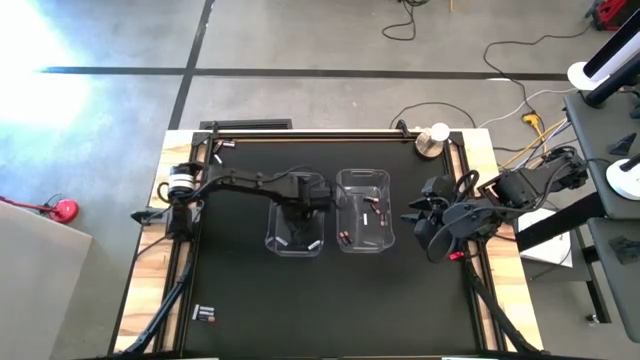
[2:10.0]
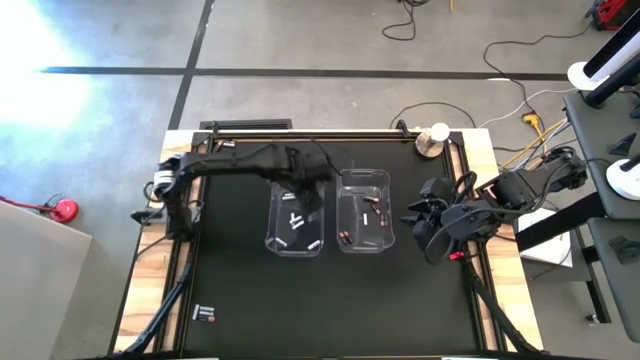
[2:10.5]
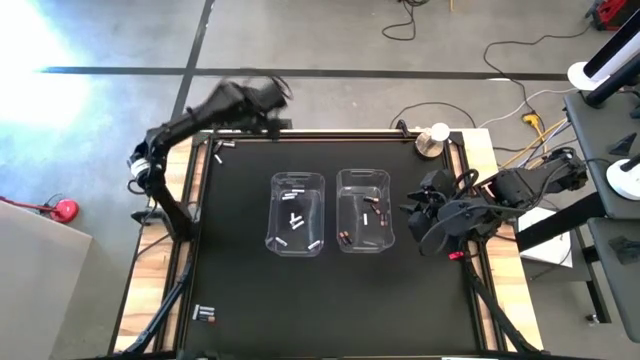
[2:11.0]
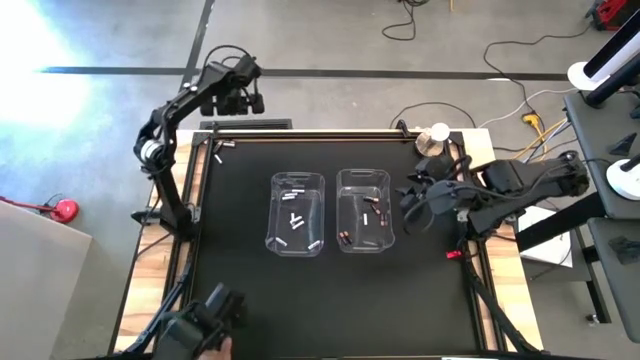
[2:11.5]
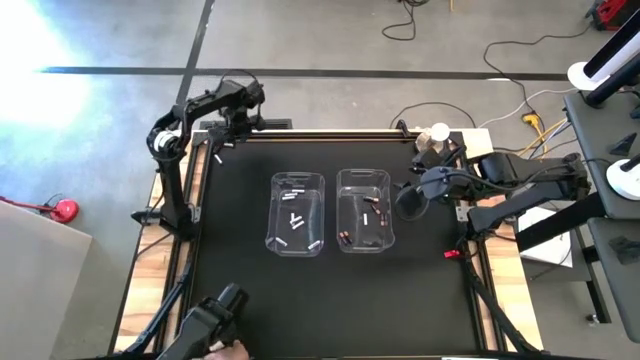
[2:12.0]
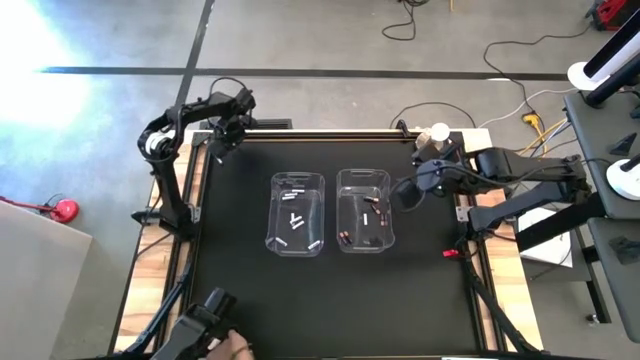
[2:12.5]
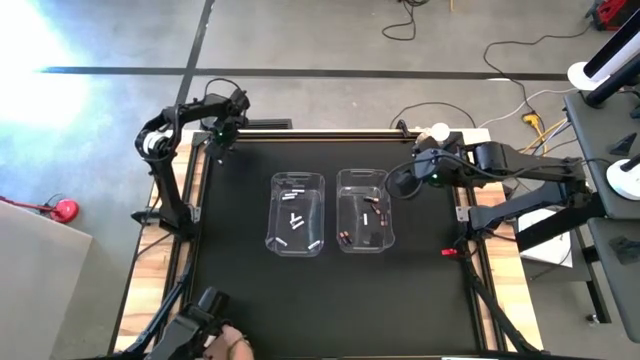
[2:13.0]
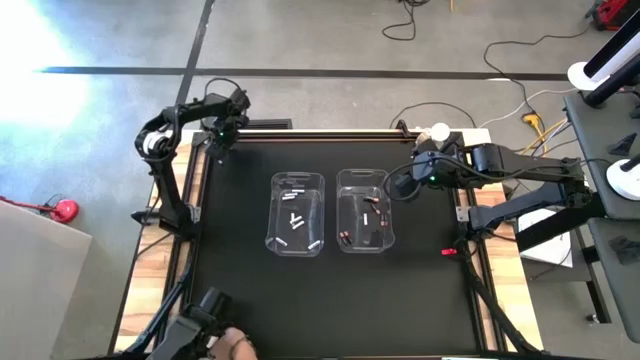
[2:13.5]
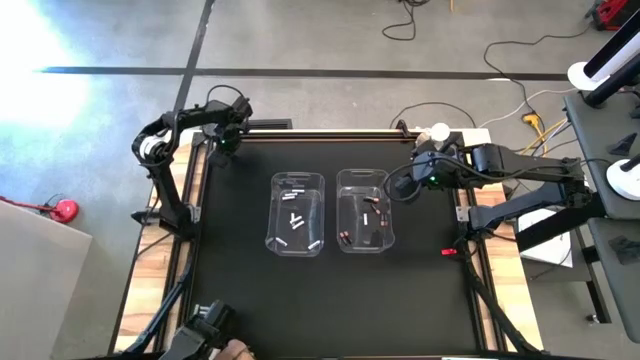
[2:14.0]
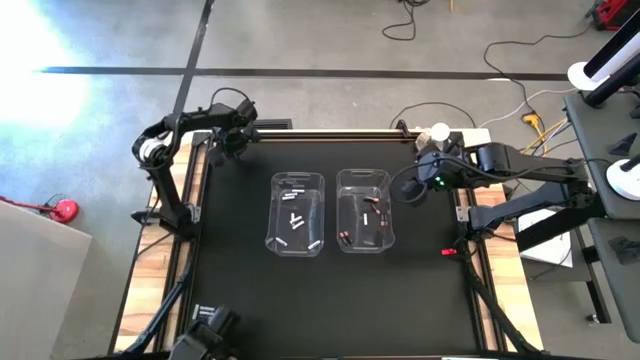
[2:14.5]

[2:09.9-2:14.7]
Task: Sort batteries
Put the white battery into the left transparent bin

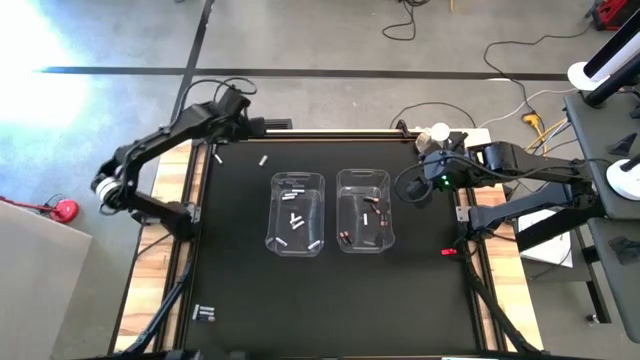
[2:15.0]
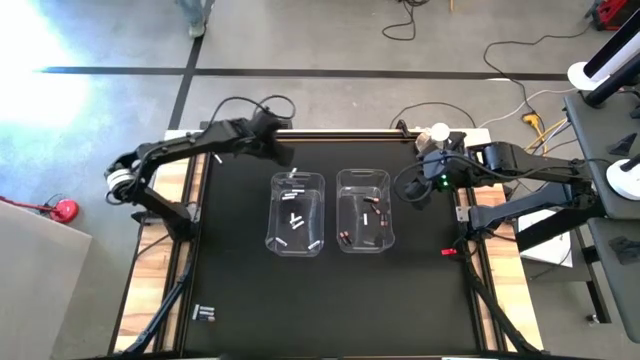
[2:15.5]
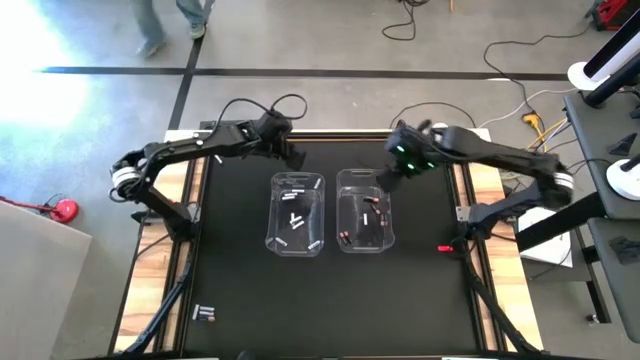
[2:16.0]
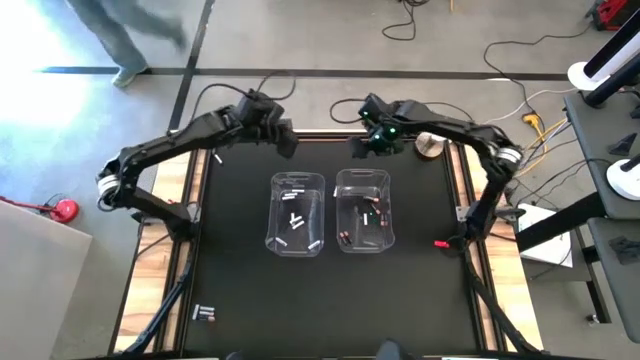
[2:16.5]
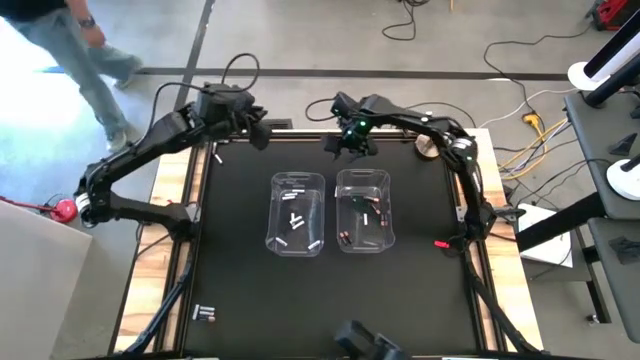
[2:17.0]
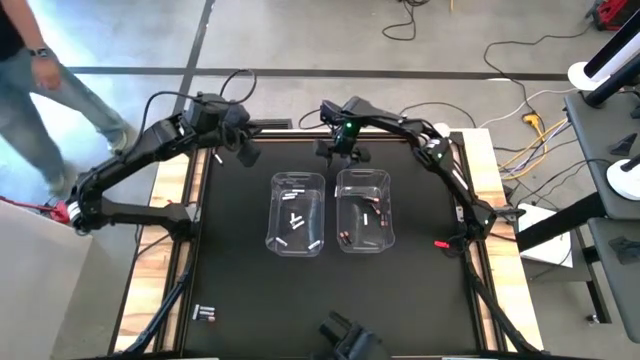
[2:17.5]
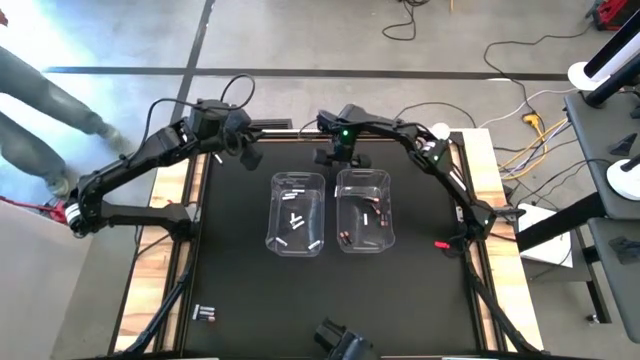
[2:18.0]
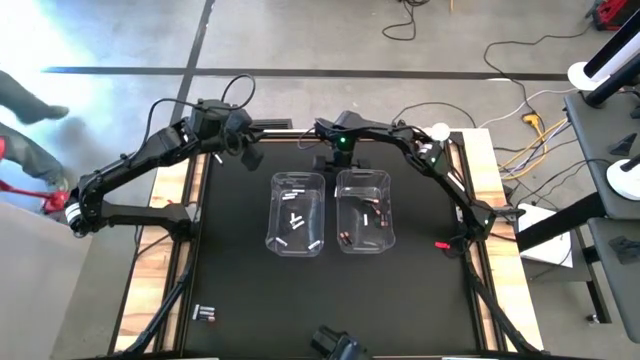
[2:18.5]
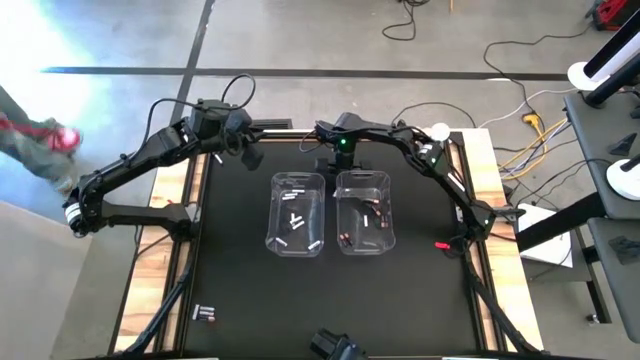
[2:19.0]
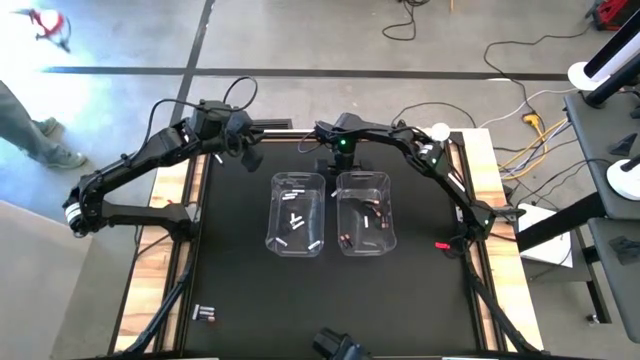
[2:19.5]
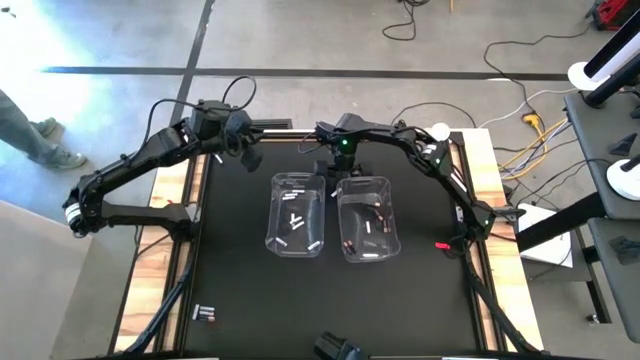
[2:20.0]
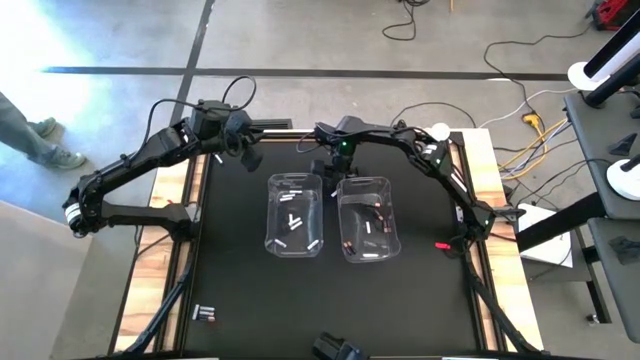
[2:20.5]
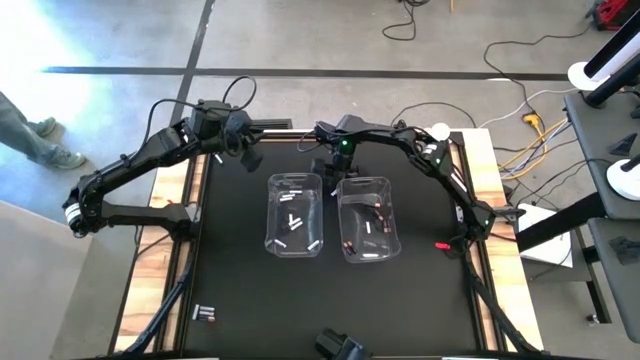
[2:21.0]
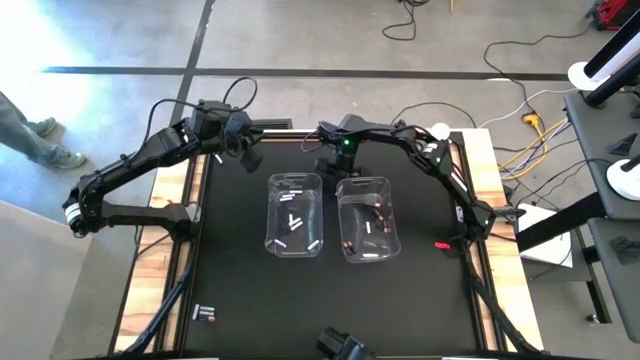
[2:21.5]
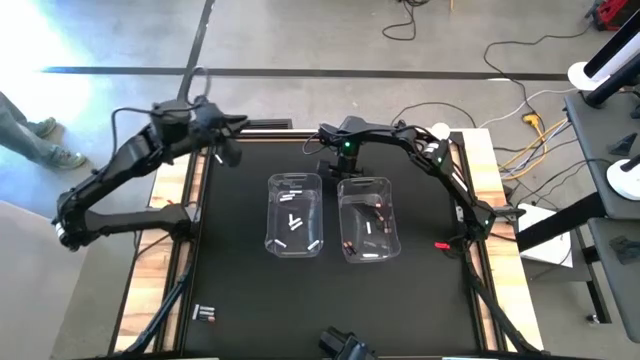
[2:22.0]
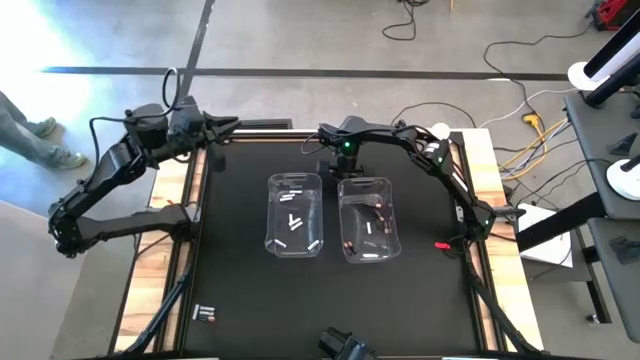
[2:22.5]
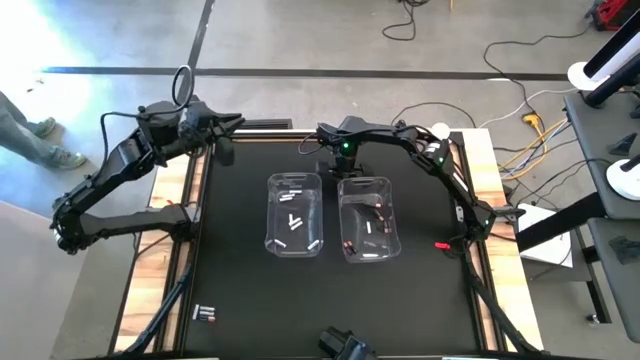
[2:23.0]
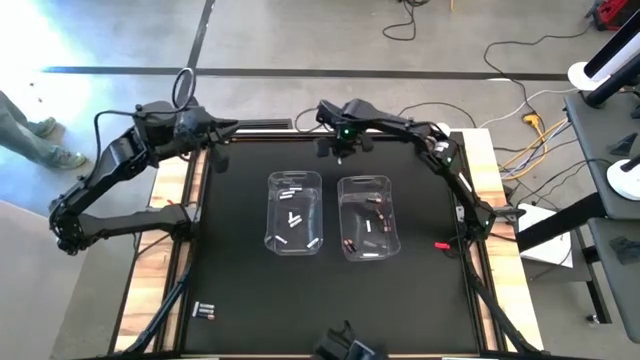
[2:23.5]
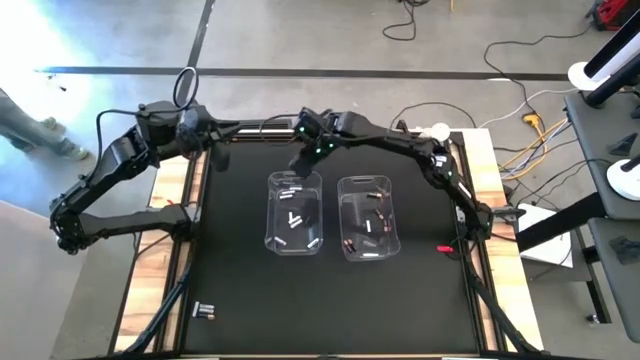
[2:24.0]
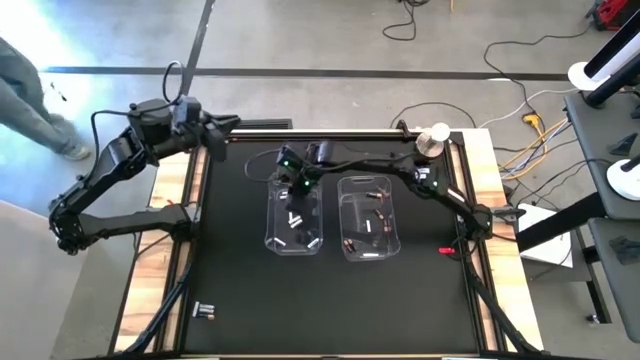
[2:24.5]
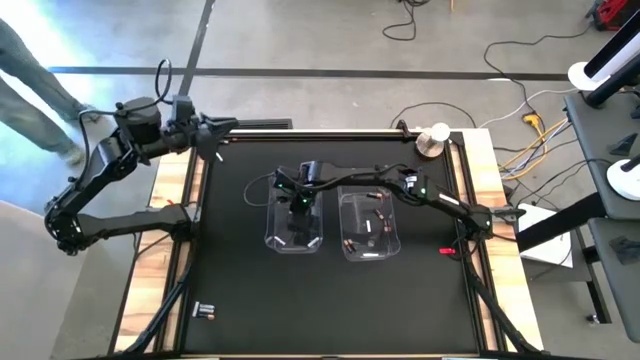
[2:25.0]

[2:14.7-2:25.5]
Put the white battery into the left transparent bin

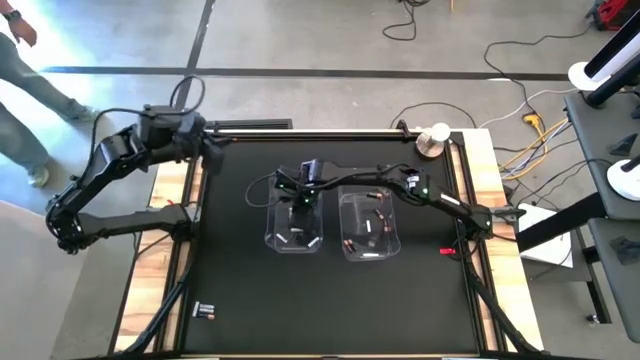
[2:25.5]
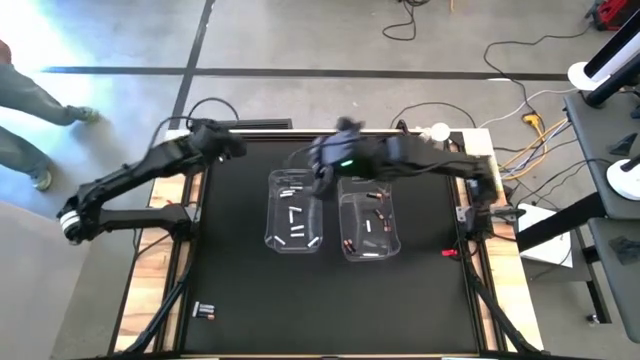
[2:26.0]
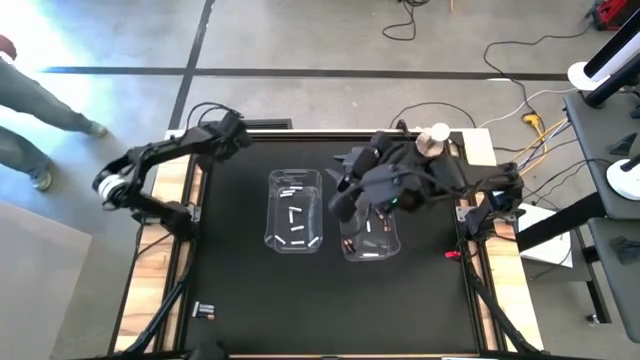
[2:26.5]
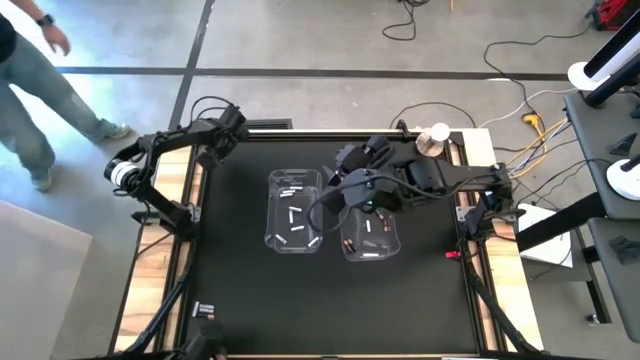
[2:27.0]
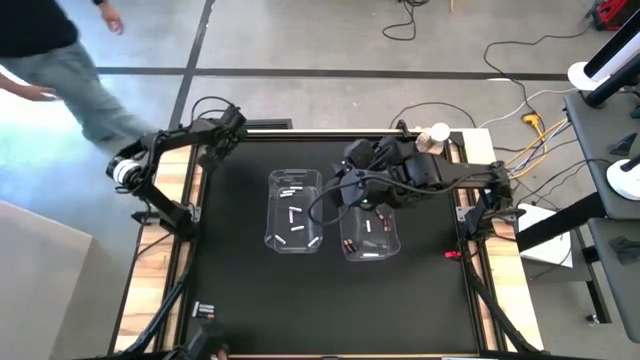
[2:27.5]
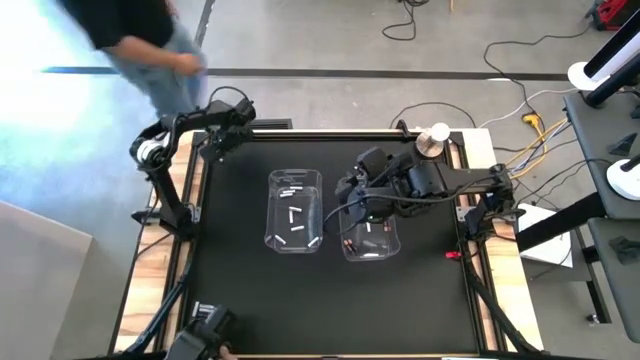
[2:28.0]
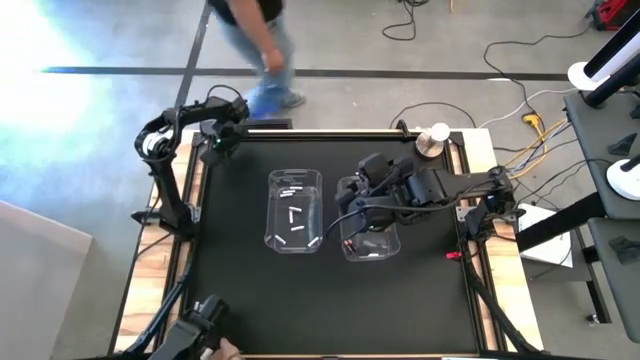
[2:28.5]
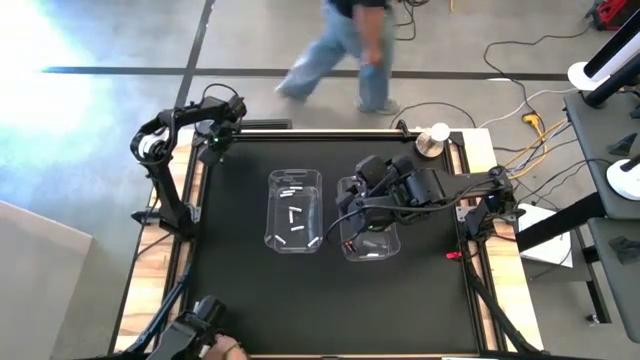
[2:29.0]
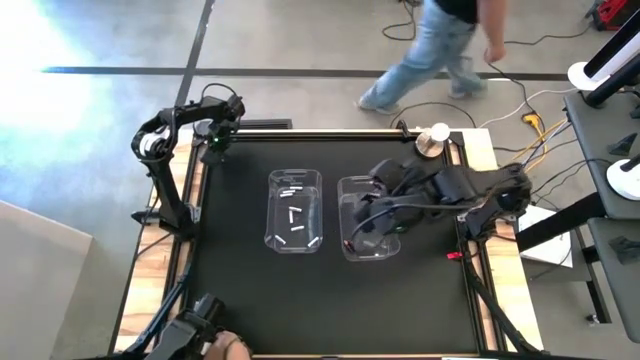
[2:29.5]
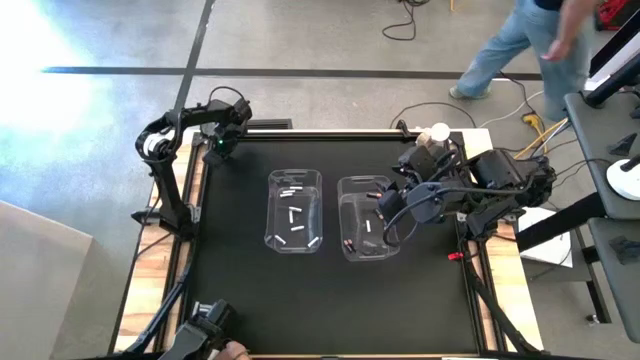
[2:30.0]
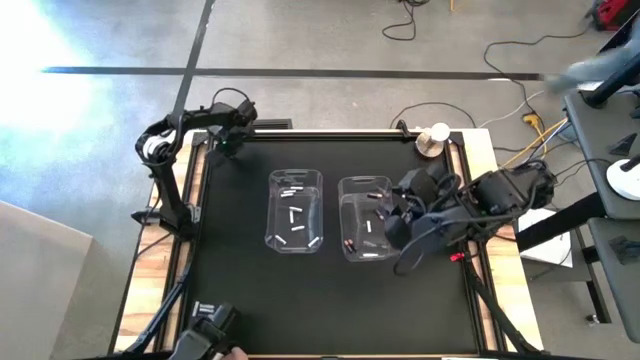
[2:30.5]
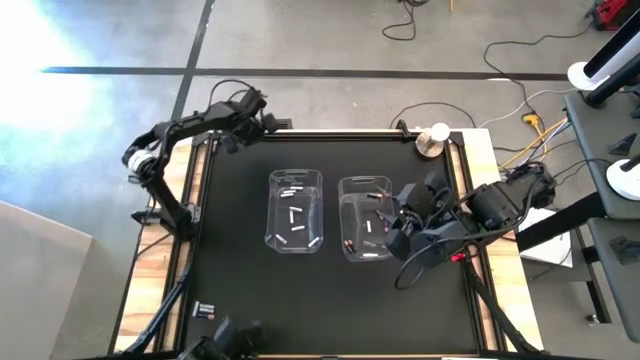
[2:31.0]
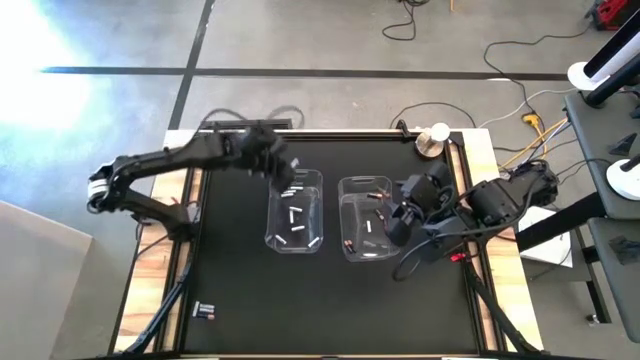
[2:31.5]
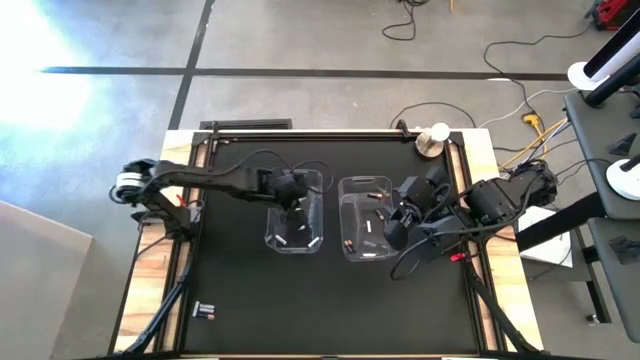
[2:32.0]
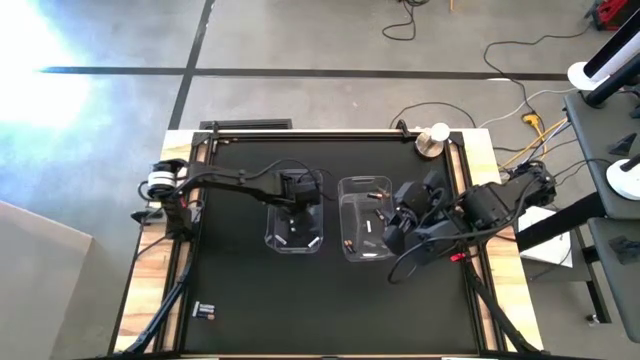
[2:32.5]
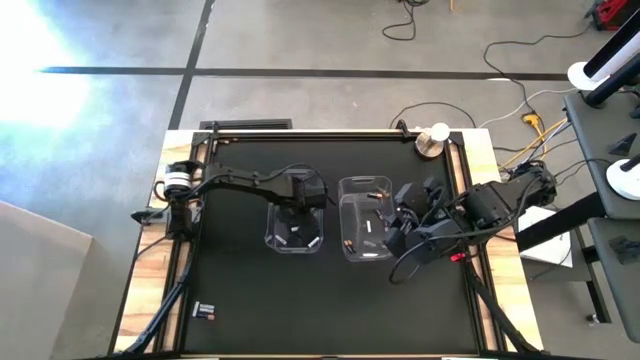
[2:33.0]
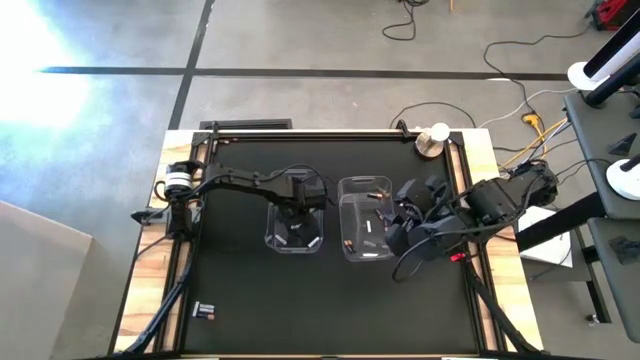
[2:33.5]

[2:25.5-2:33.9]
Put the white battery into the left transparent bin
